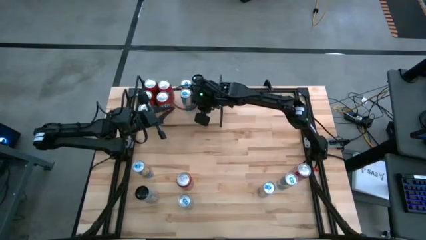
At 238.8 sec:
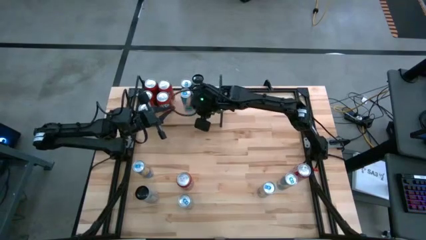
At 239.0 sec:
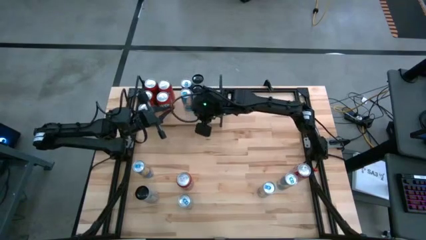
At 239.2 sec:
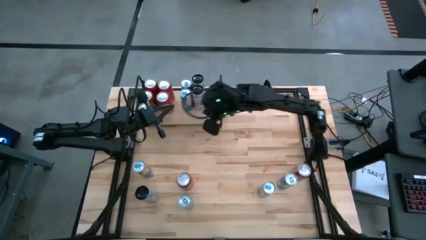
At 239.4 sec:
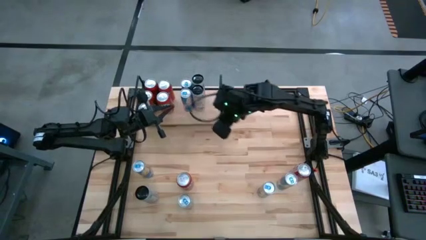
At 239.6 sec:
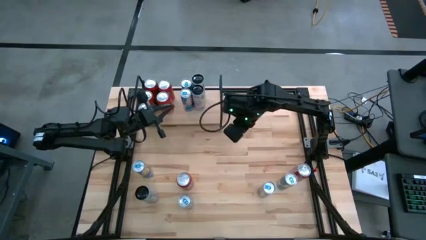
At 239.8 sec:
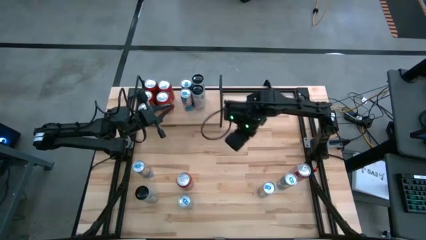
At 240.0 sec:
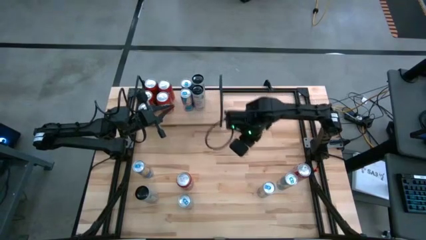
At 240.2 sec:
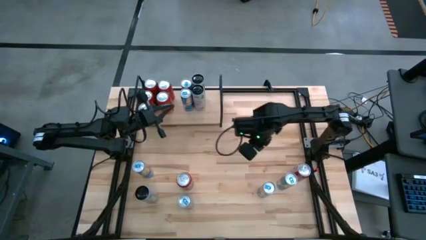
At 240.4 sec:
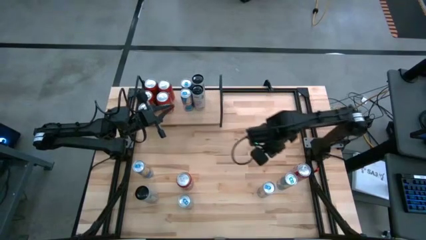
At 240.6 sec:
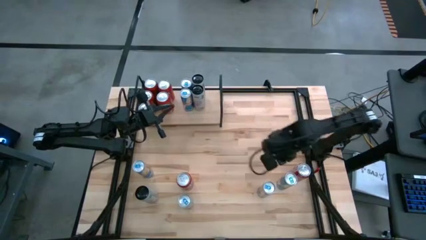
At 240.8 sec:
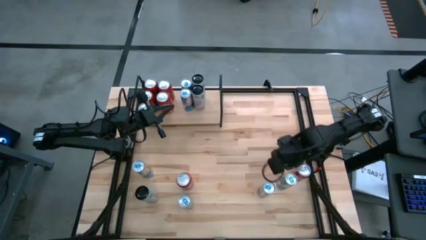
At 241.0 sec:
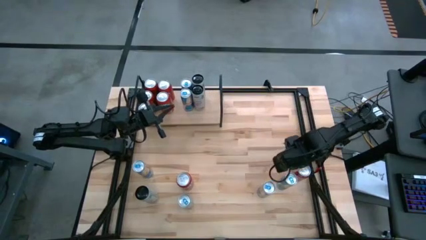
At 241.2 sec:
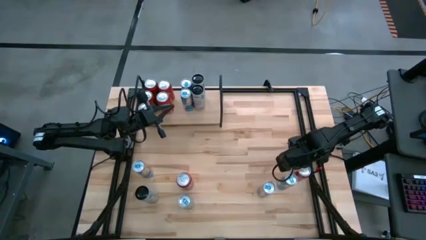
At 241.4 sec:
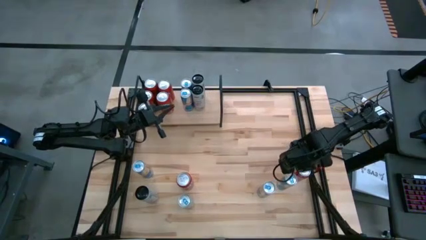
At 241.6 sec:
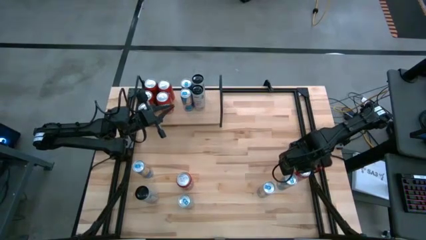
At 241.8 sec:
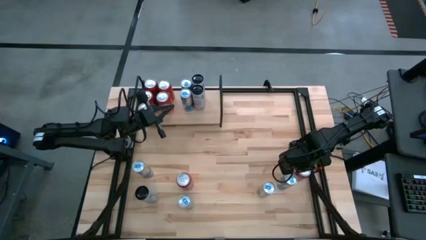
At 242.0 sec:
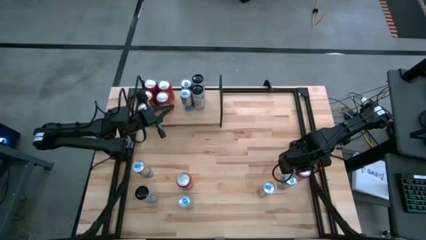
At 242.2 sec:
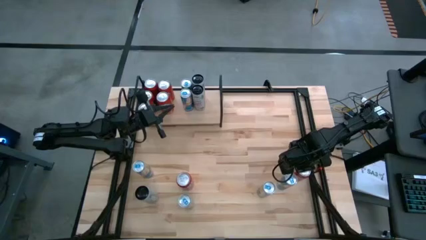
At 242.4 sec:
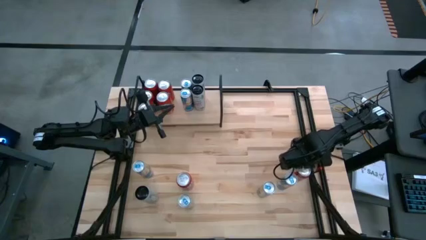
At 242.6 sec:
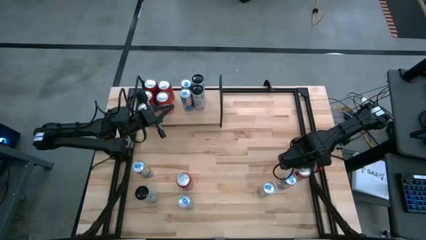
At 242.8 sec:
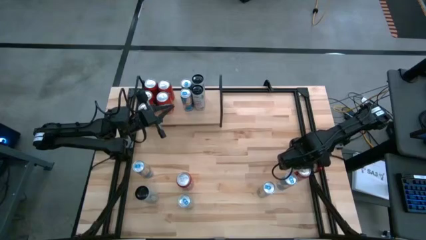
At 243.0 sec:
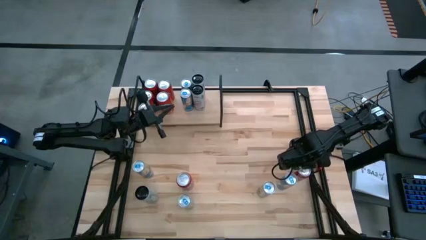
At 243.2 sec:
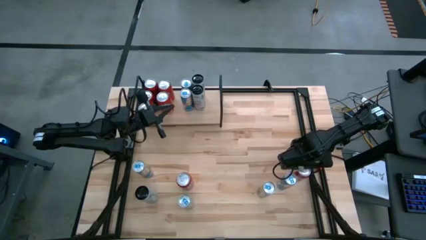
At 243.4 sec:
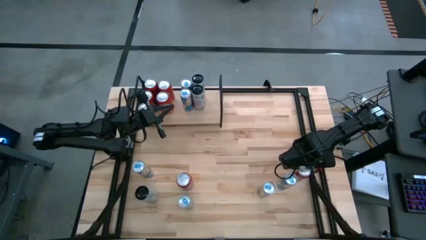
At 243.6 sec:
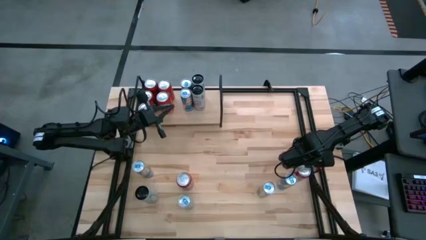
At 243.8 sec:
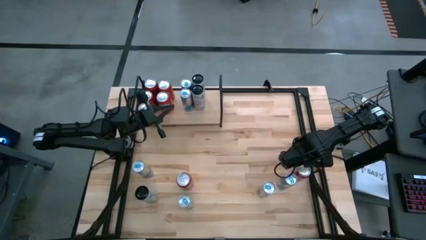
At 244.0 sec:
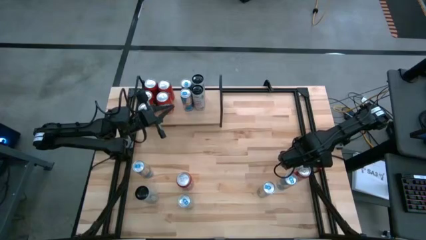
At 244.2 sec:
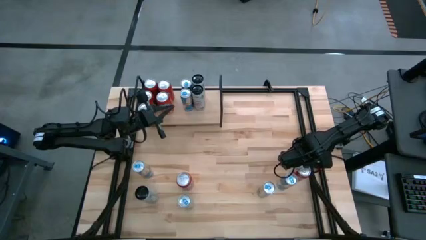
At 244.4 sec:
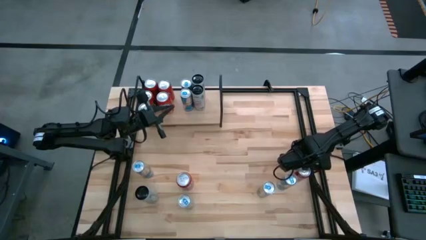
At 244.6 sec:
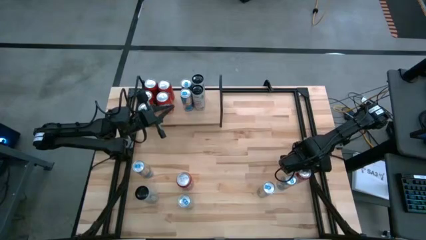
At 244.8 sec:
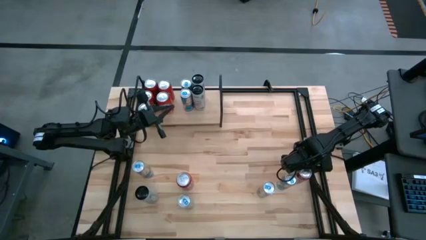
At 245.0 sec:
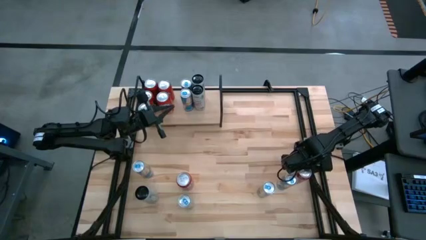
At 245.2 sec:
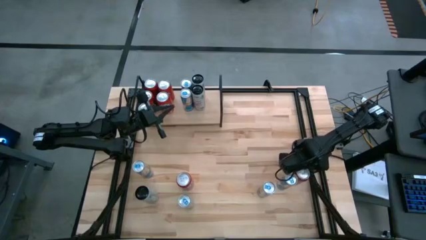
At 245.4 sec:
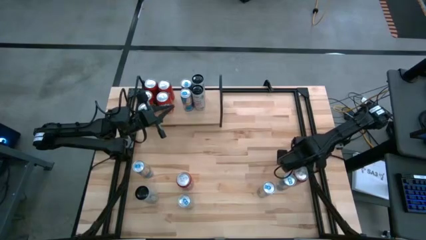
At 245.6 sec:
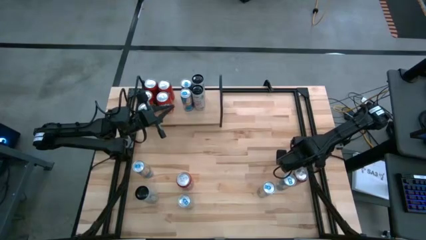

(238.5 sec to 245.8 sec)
Task: Place canned beverage on shelf
Put the red/white soda can on the shelf

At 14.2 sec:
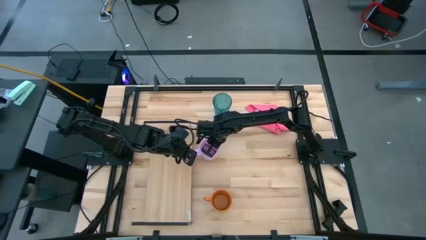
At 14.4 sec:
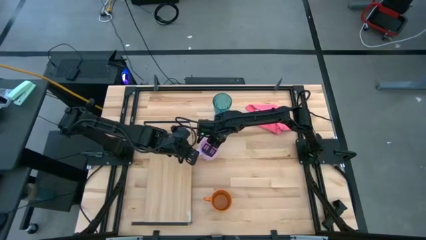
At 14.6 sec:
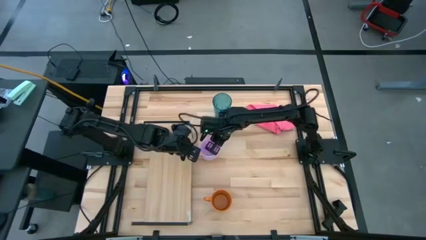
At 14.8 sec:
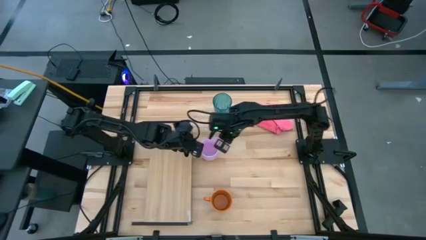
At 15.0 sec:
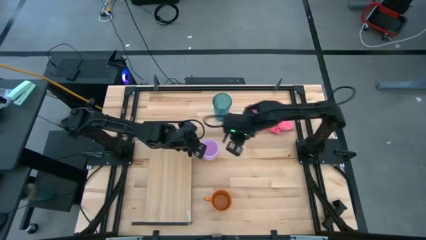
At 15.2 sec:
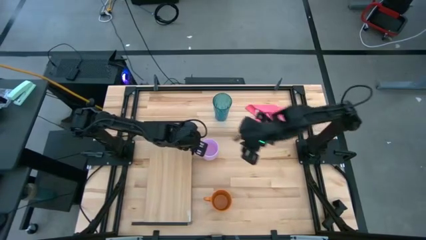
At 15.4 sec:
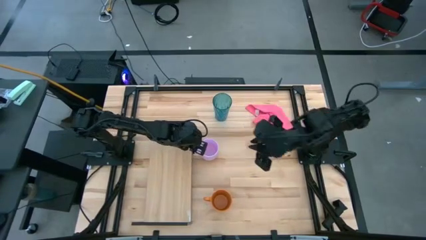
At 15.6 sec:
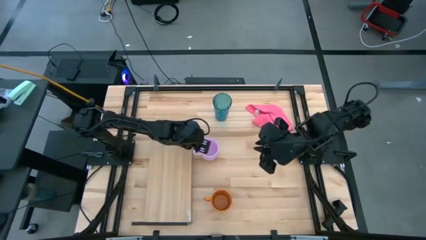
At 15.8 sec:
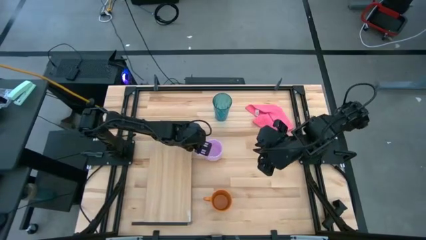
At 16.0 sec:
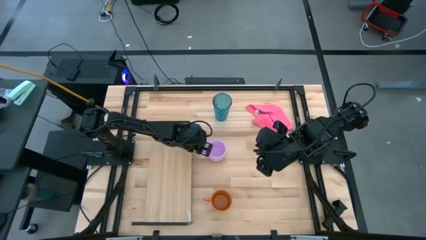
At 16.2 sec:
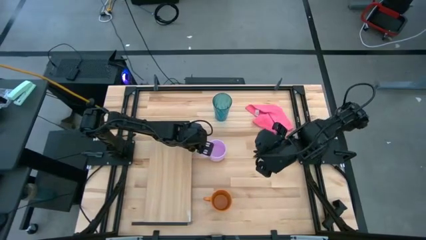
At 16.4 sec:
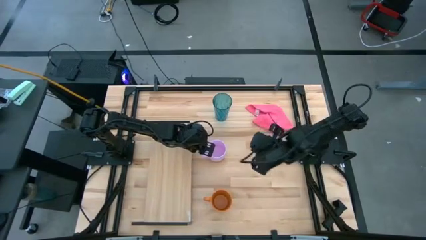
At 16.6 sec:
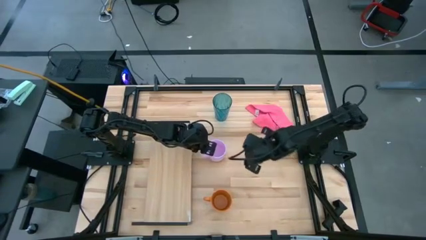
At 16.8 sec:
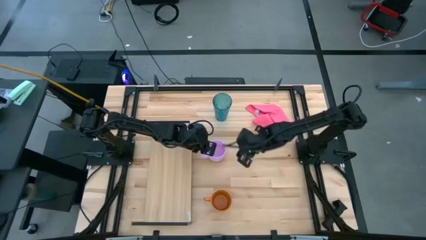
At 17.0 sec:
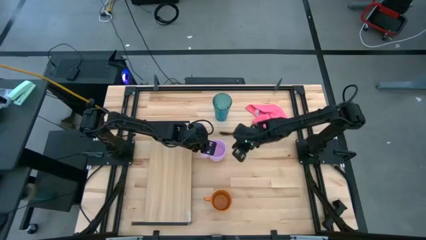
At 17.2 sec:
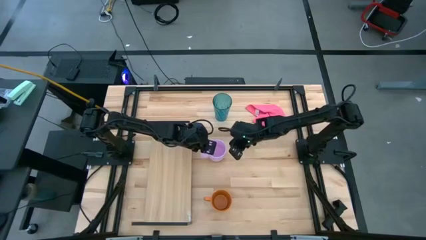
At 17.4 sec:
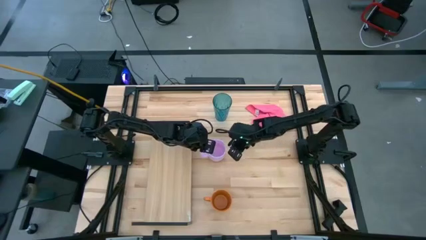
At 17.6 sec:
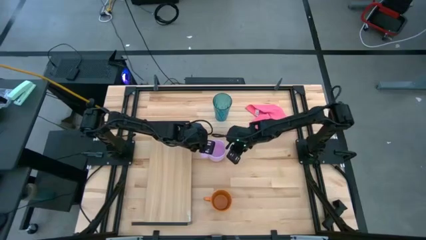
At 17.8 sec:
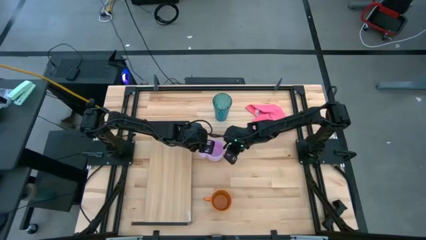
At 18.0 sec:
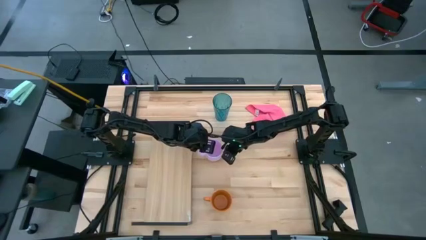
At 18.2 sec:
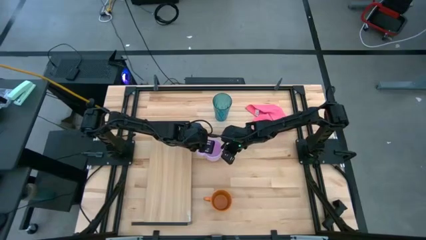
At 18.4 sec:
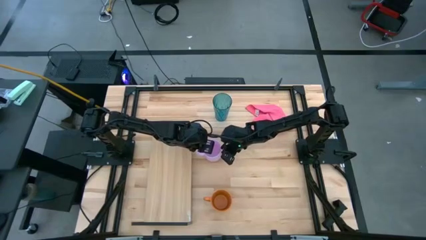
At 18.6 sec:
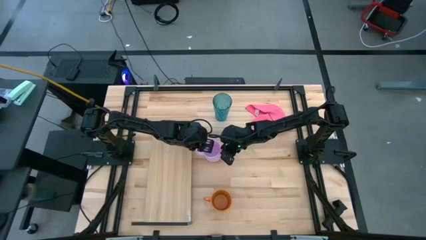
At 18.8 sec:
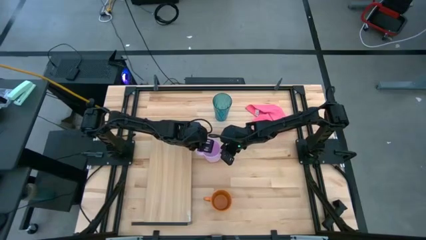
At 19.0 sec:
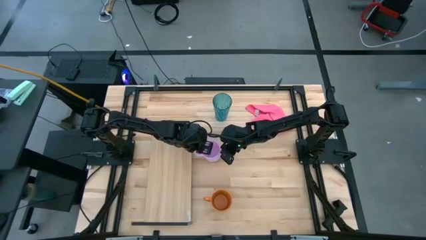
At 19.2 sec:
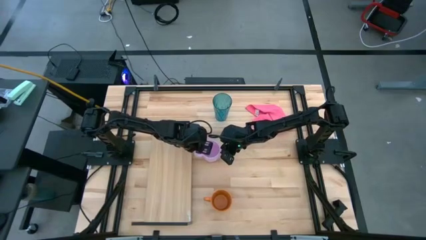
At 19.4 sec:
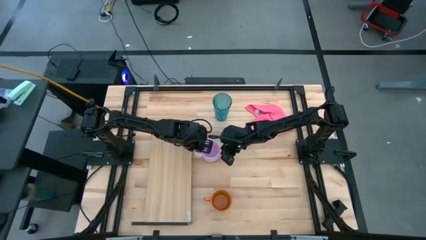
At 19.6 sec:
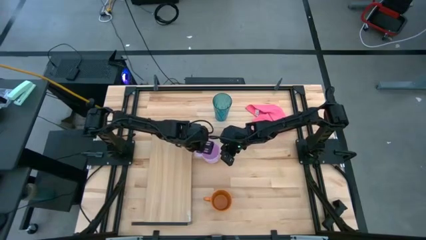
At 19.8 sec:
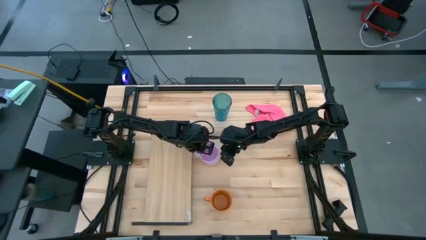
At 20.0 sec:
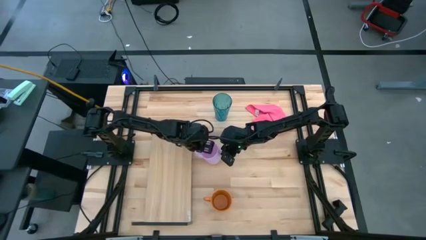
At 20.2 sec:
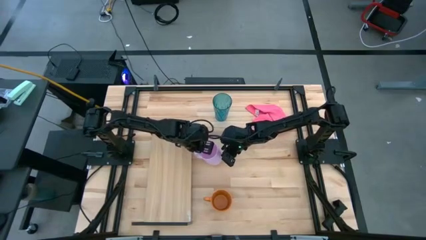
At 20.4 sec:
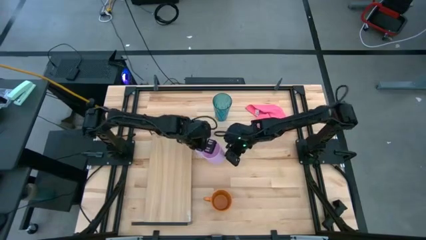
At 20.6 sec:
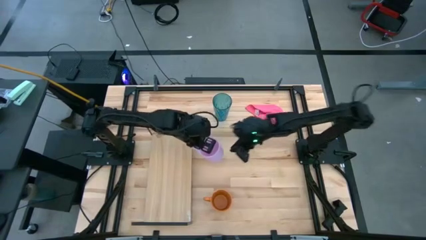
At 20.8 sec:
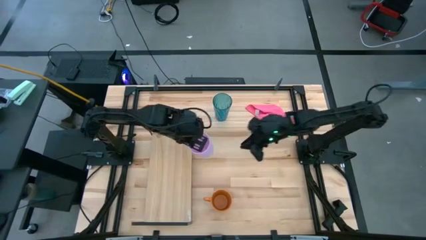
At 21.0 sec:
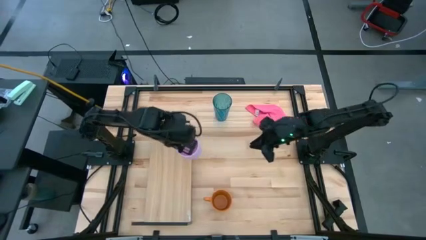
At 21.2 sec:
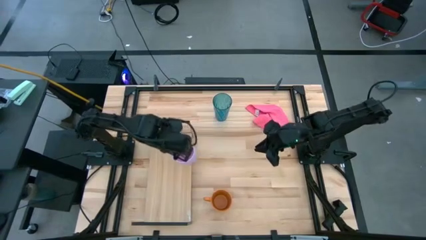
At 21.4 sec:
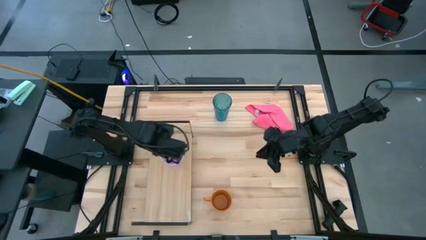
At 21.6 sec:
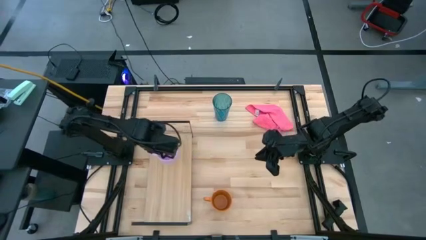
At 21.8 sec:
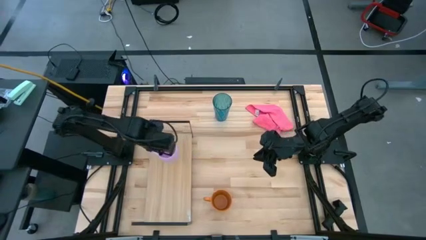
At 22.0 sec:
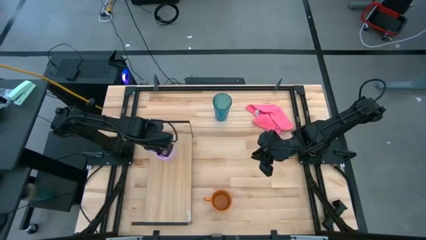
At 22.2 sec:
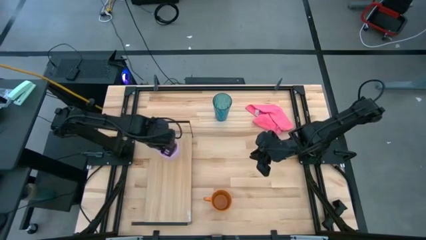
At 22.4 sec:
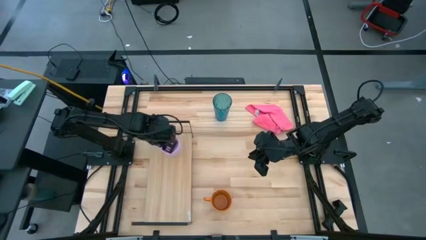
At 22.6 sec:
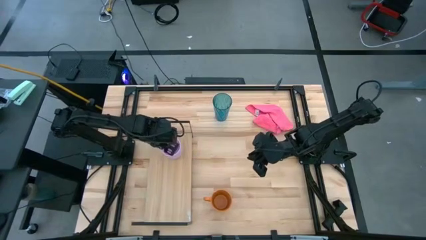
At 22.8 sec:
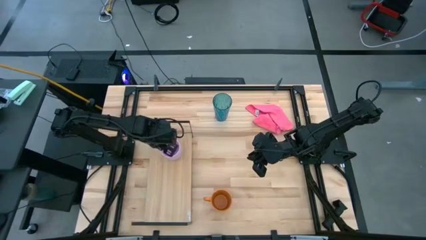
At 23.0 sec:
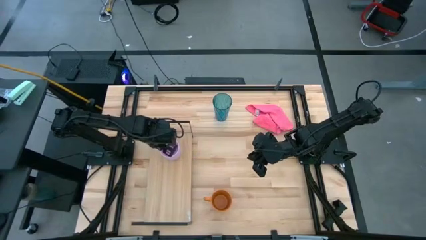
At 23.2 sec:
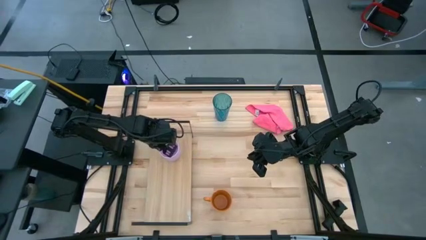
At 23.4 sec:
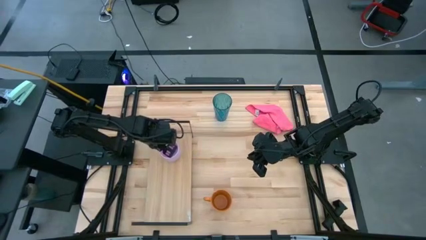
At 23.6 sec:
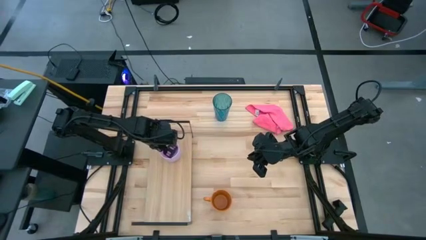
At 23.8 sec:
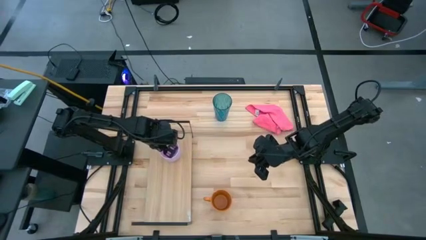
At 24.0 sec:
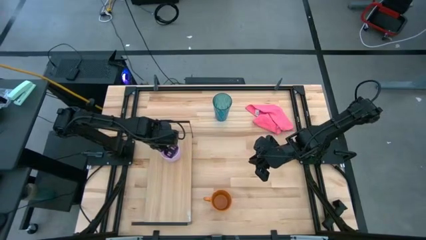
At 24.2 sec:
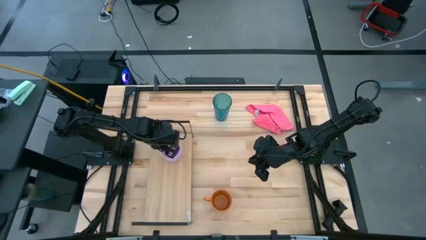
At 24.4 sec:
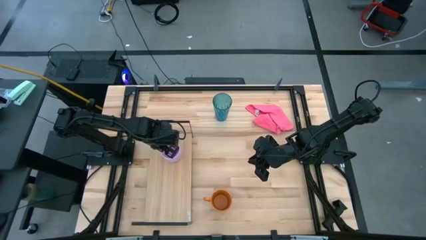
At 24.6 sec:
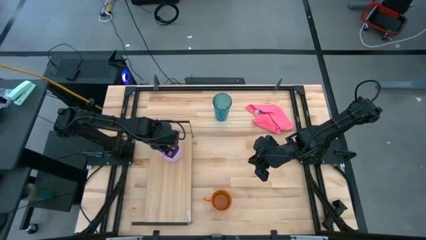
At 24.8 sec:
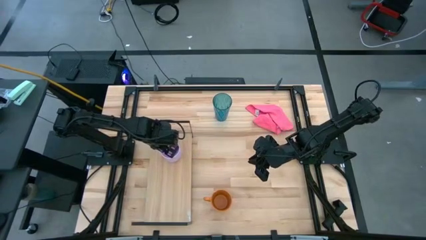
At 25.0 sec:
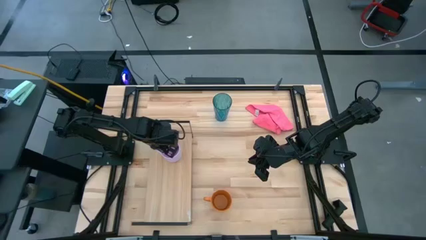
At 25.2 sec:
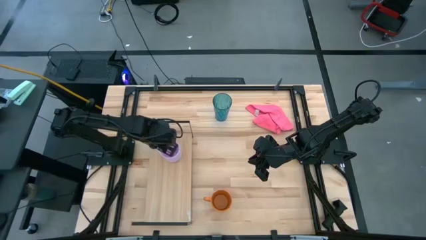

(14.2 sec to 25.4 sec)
Task: Stack small to large cups/mugs on shelf
Put the purple cup on the shelf
